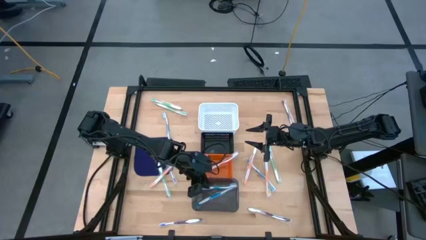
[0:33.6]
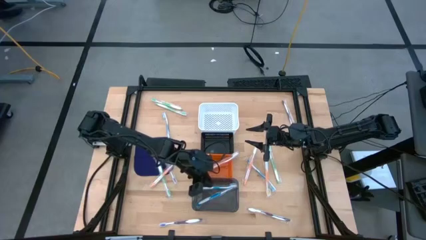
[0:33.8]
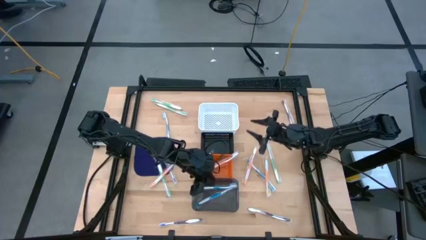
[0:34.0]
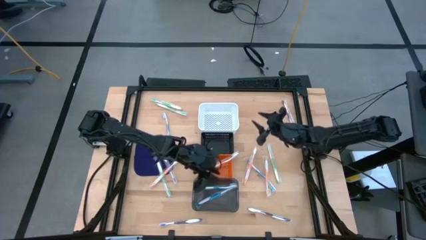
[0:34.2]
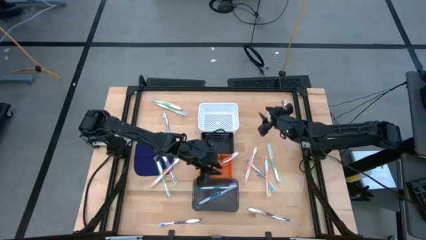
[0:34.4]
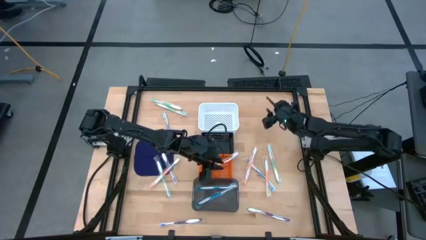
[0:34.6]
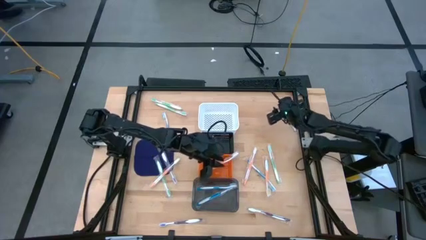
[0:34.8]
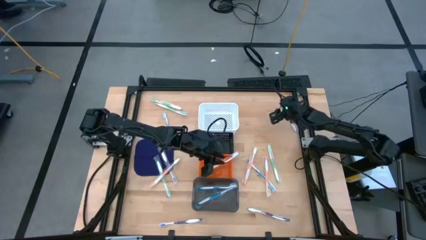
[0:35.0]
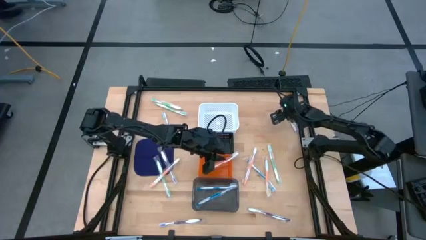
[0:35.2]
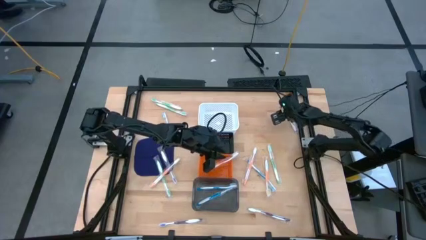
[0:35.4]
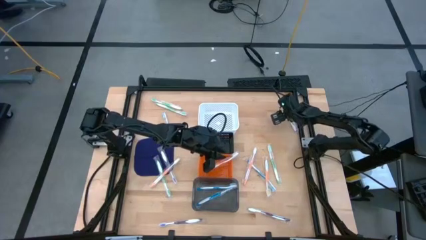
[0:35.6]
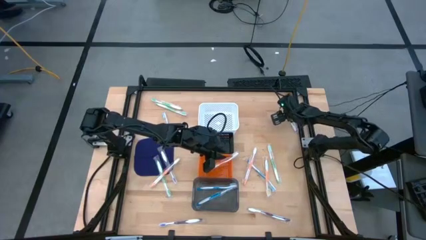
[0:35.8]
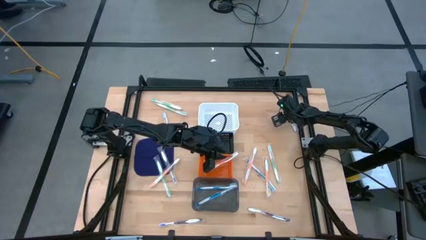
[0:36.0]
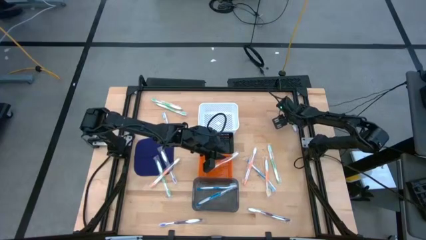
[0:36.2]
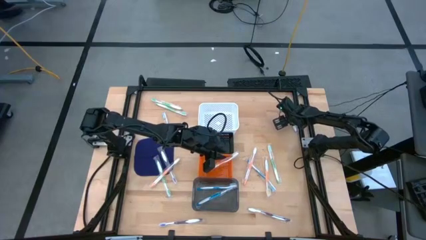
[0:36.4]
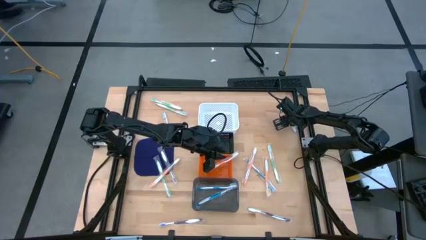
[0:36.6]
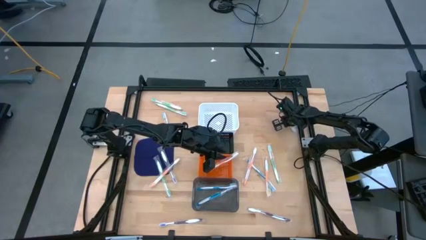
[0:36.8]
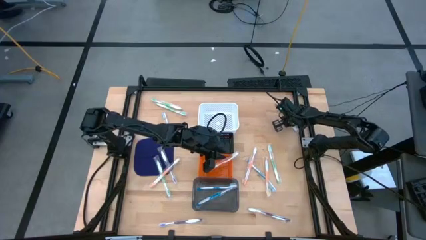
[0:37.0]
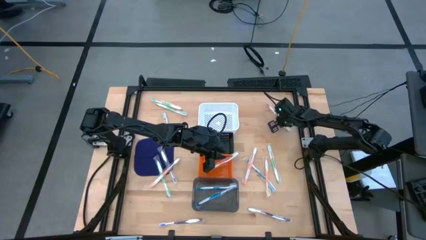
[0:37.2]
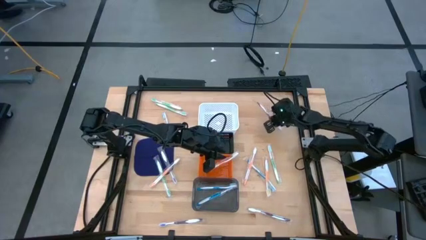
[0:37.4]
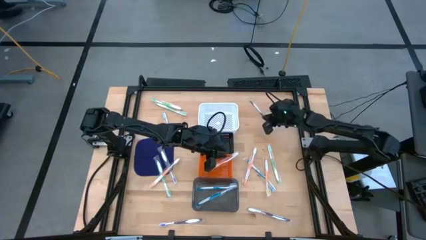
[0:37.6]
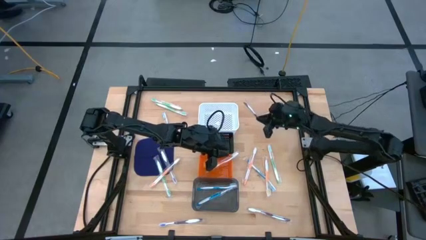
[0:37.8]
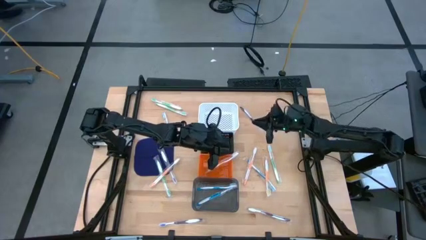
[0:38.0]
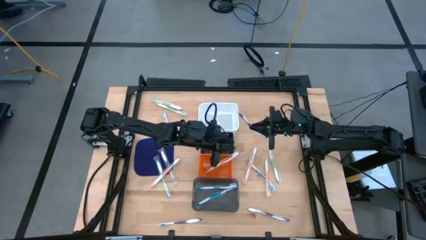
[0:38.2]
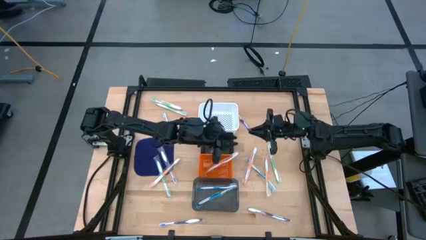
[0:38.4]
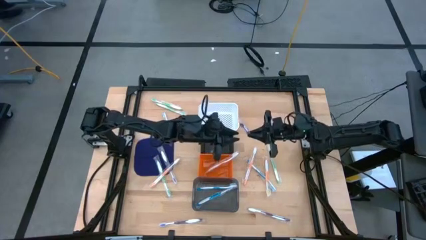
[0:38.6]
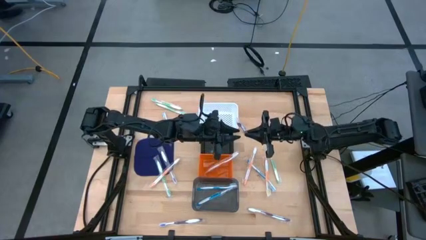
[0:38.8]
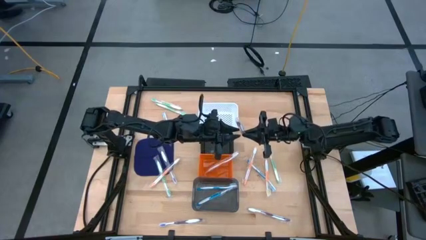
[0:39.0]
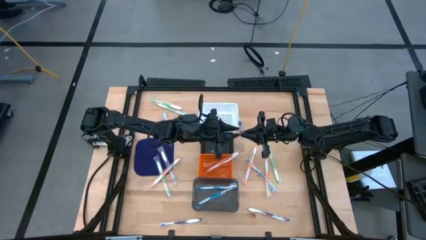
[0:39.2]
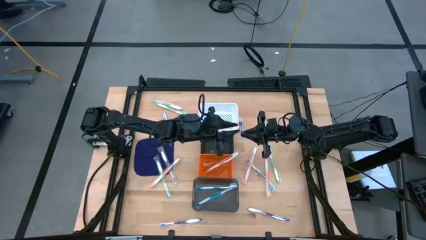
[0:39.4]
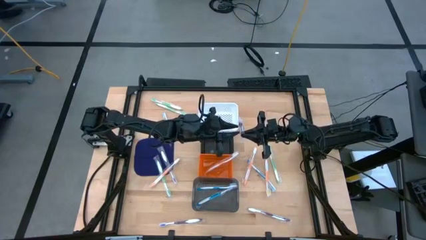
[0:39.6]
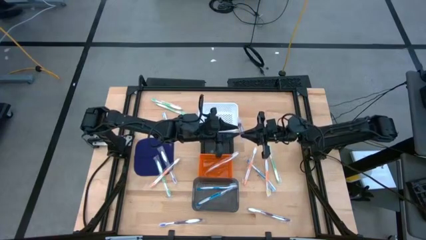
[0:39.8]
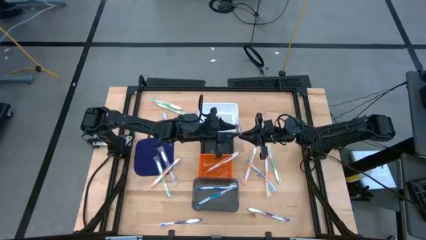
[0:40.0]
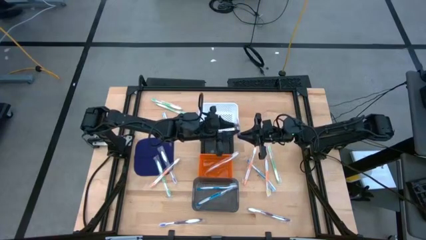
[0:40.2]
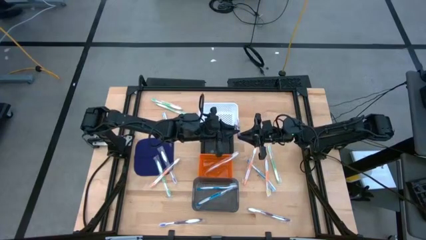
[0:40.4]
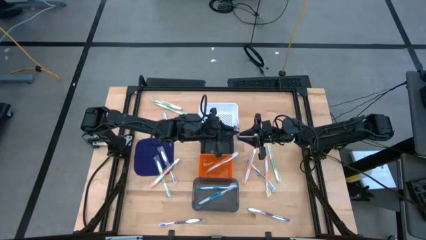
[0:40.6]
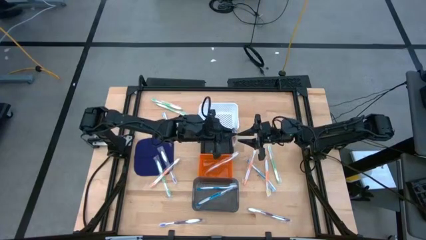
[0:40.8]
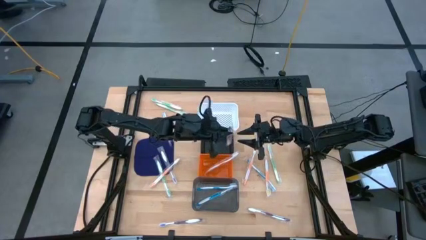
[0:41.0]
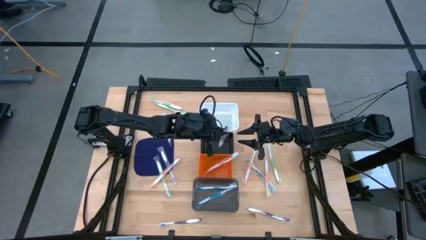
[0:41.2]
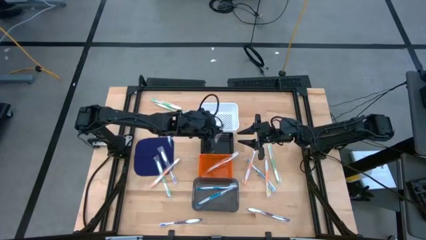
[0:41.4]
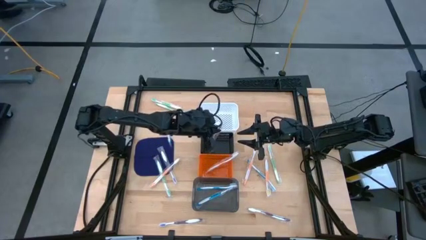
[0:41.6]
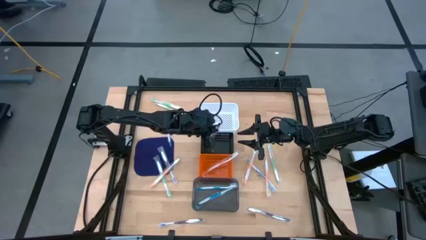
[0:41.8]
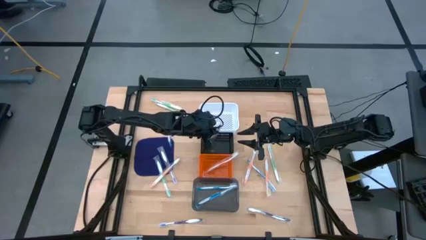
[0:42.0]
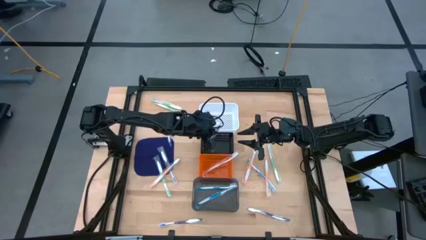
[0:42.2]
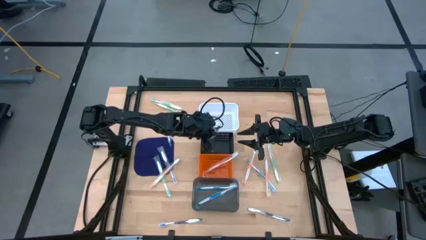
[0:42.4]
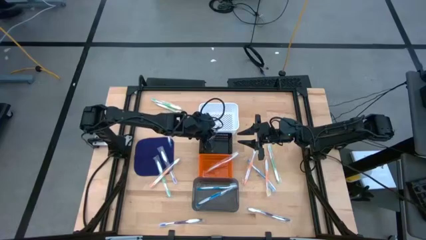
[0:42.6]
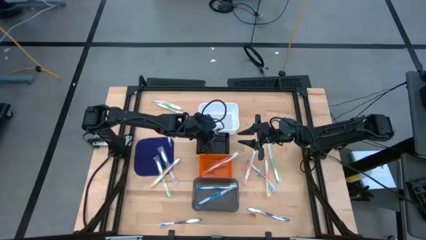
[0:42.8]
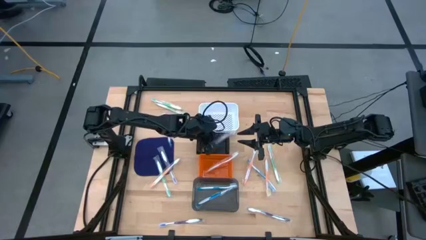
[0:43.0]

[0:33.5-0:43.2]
Task: Pick & Place Toothbrushes
Put the top right violet toothbrush into the black bin

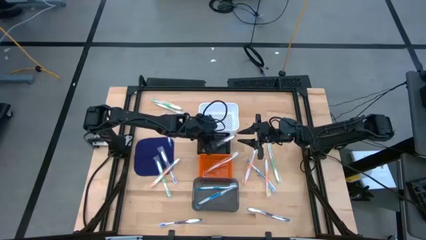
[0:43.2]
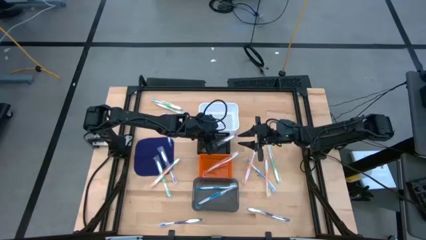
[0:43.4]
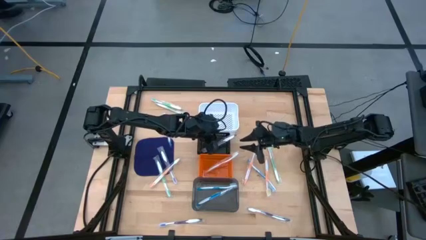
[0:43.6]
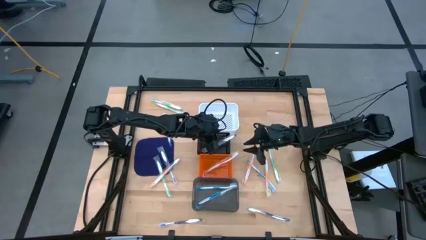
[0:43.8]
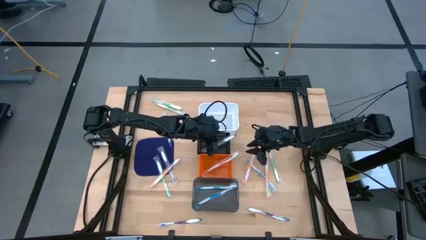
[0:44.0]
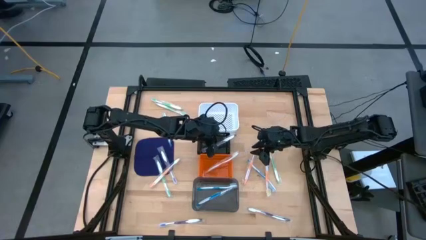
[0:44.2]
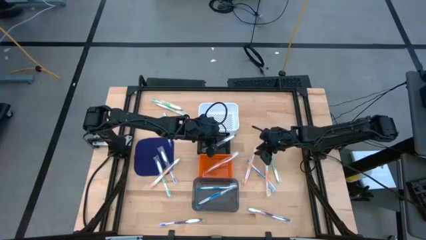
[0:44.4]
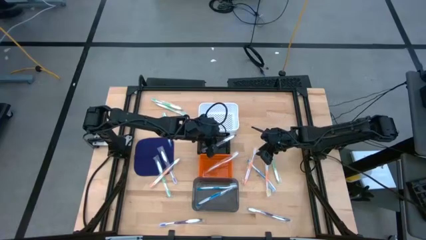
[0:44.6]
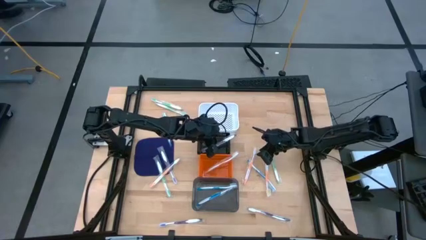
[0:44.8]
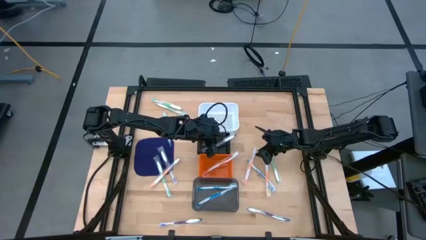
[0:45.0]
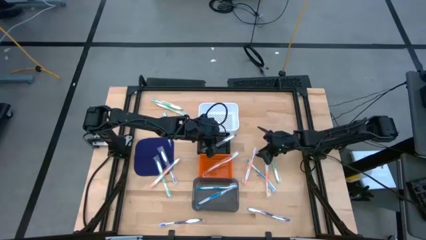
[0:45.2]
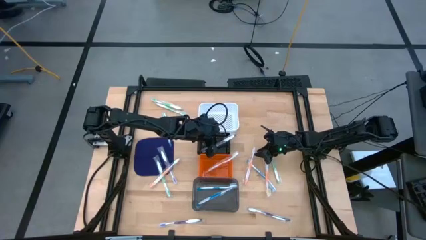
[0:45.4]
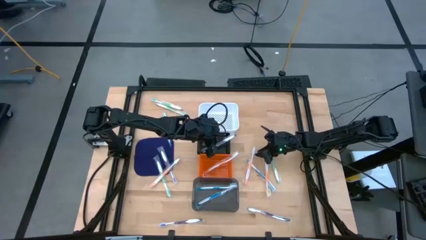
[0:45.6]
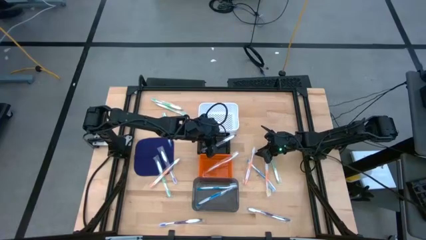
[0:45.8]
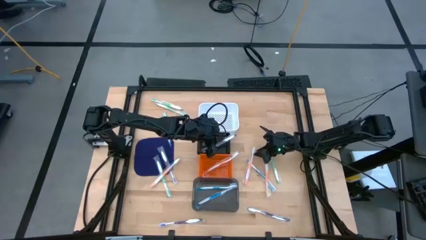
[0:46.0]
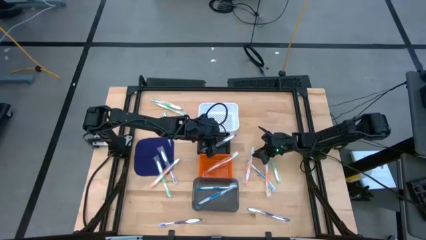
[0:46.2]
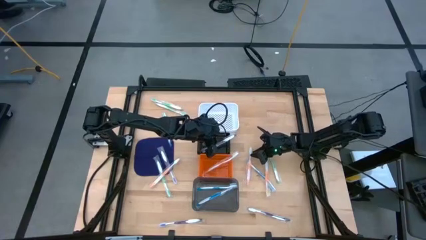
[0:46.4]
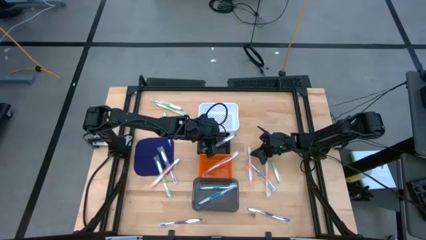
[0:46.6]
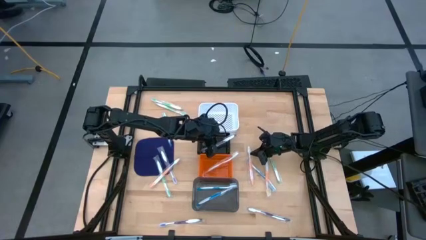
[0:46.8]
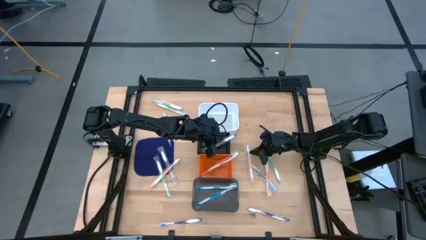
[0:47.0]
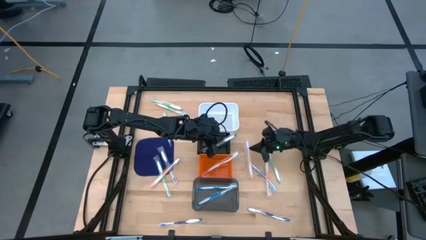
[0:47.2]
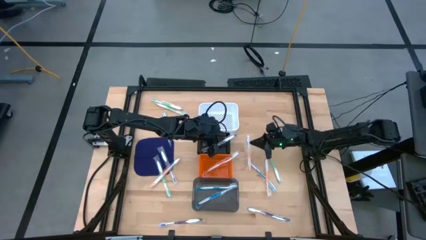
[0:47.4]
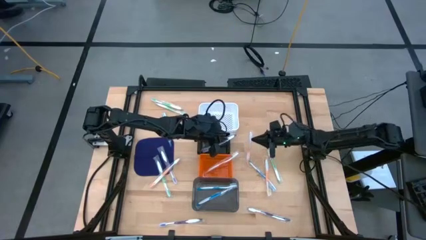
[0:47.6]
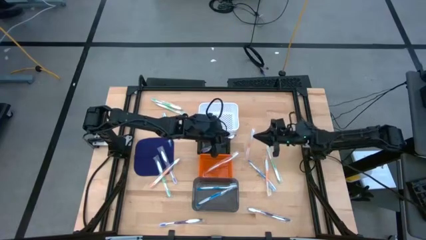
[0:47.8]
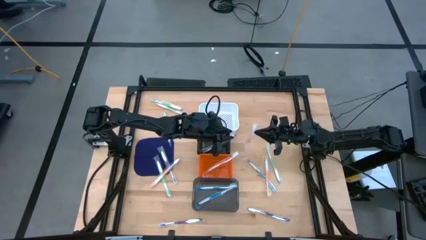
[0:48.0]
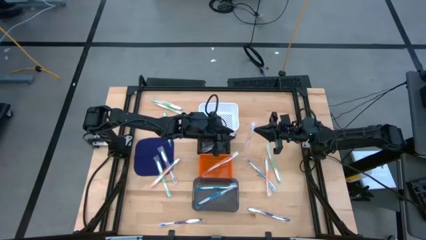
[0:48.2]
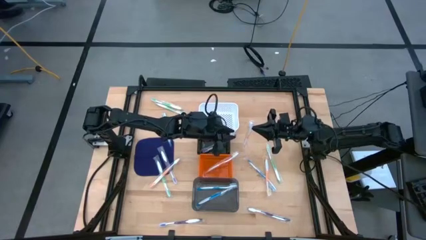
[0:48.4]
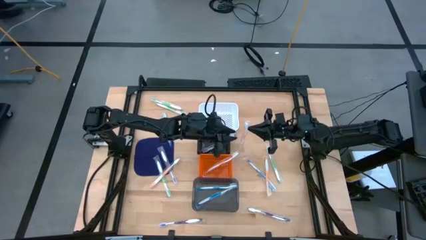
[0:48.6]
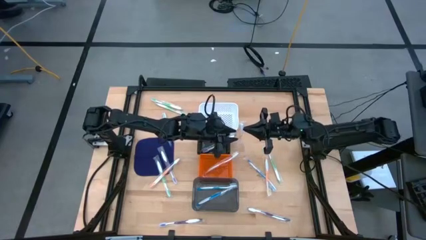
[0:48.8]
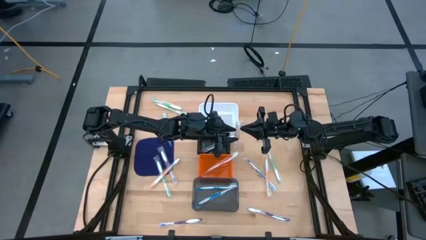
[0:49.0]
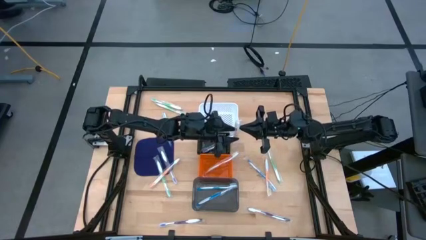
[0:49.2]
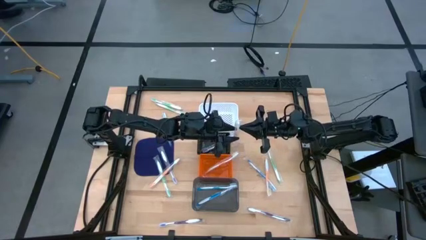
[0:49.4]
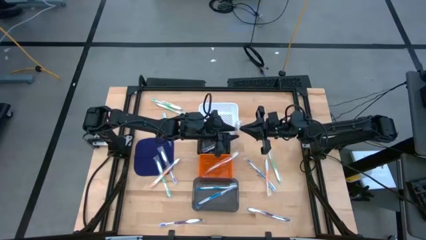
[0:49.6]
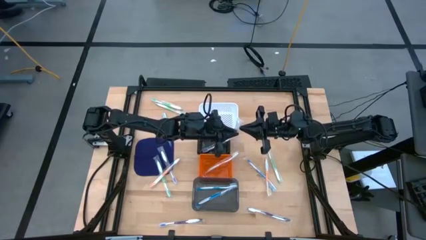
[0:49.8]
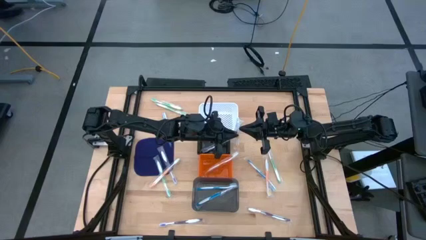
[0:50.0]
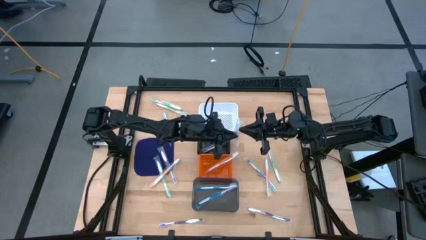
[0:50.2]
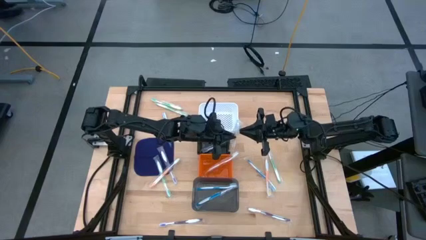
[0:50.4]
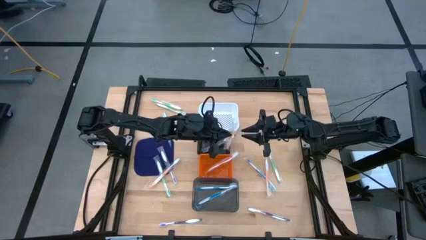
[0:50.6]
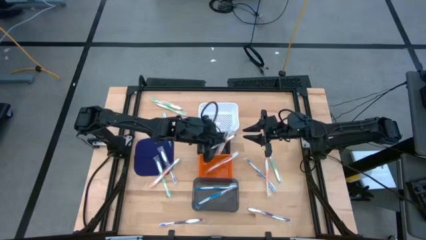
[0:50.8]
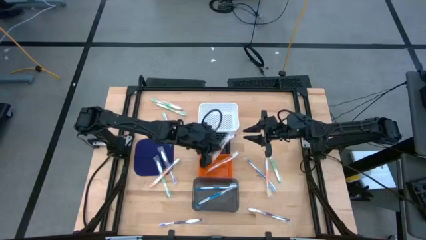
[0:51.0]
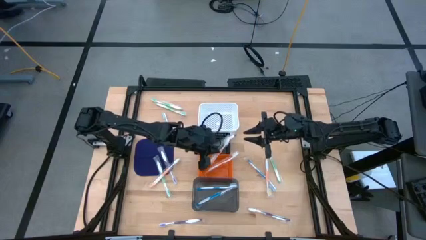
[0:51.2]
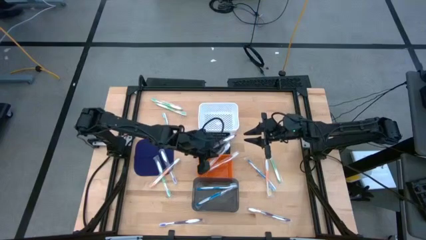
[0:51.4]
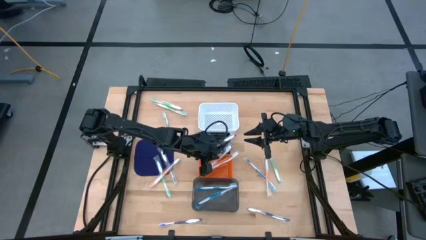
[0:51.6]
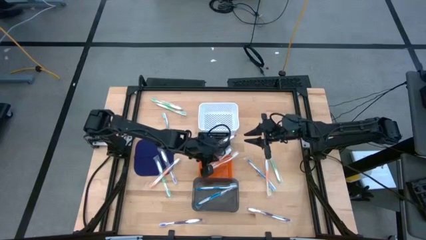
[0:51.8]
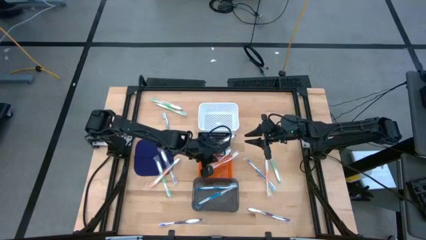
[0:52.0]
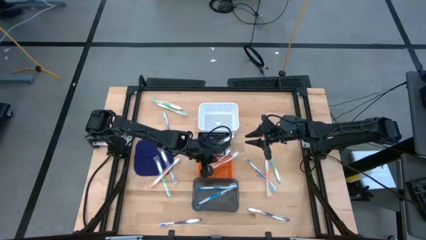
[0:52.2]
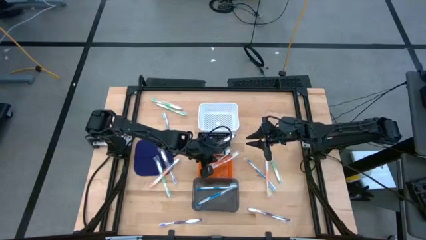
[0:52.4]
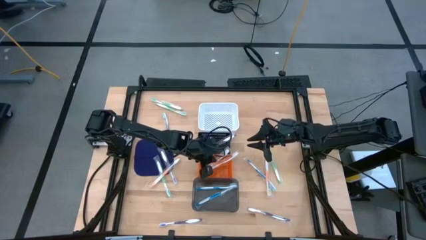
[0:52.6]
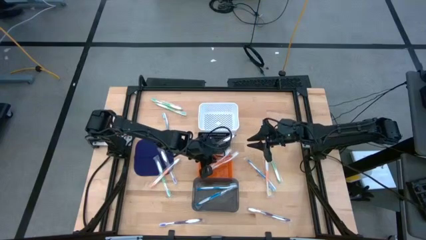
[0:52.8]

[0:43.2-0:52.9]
Put the middle orange toothbrush into the orange bin
